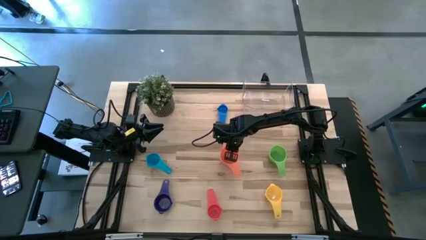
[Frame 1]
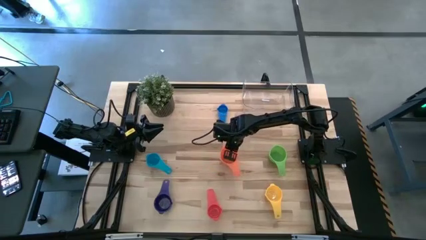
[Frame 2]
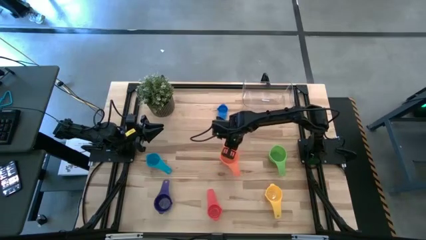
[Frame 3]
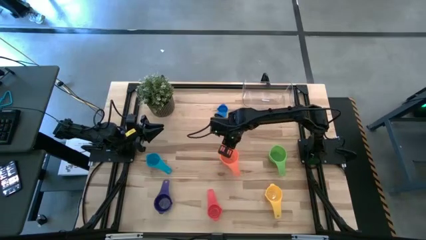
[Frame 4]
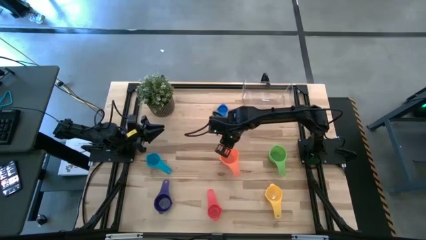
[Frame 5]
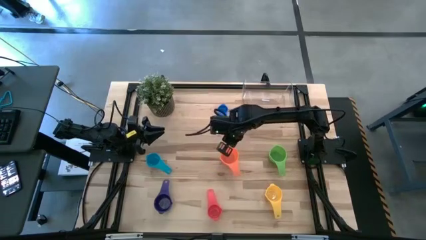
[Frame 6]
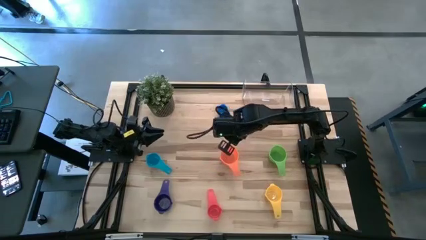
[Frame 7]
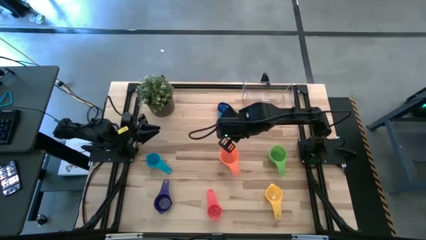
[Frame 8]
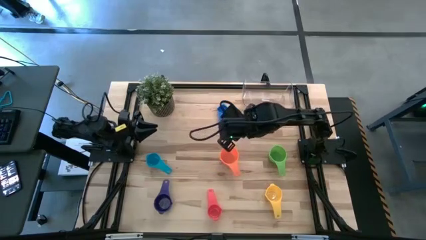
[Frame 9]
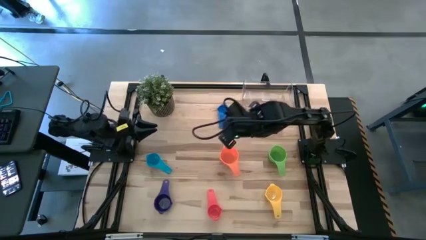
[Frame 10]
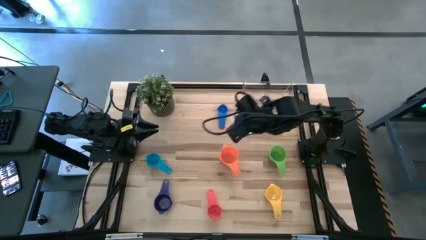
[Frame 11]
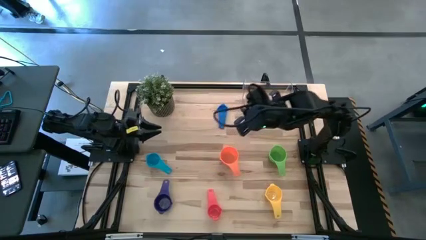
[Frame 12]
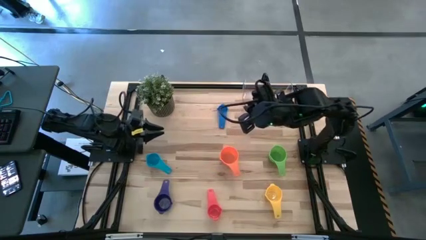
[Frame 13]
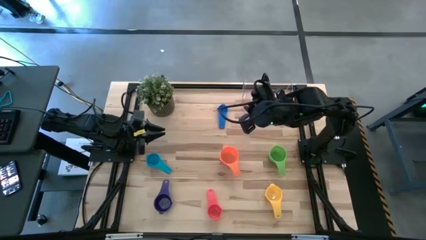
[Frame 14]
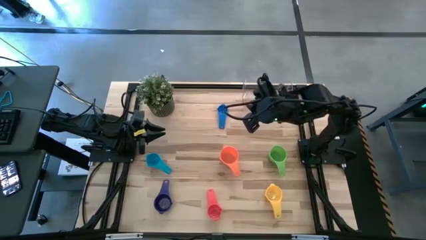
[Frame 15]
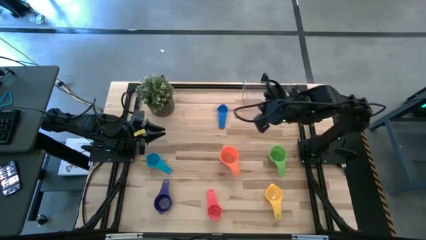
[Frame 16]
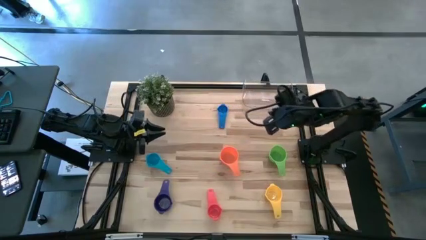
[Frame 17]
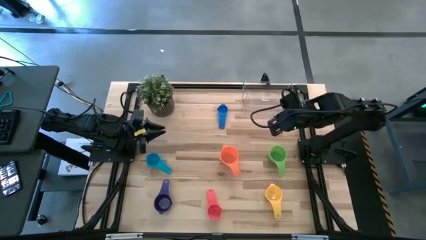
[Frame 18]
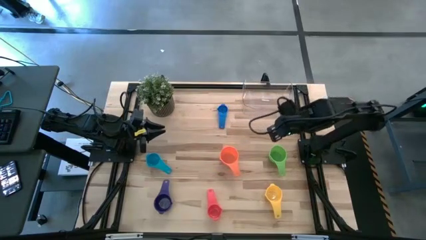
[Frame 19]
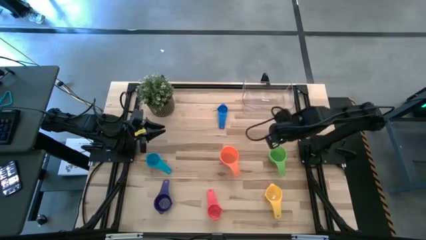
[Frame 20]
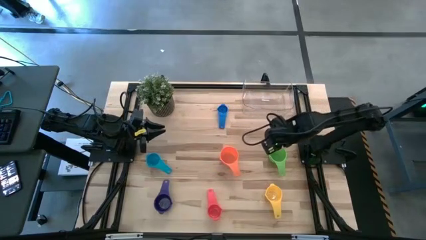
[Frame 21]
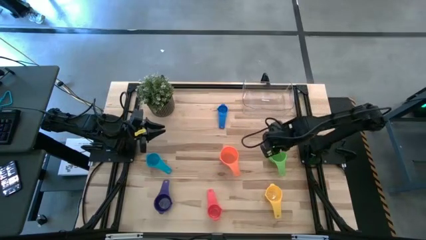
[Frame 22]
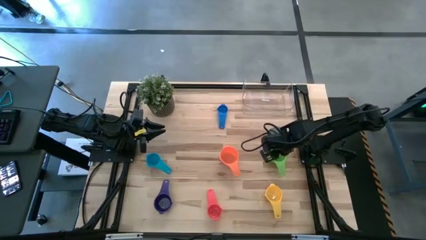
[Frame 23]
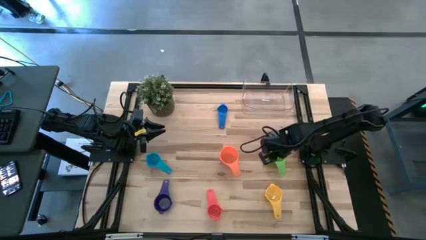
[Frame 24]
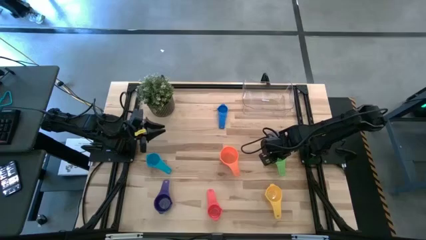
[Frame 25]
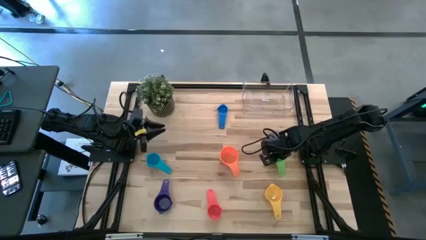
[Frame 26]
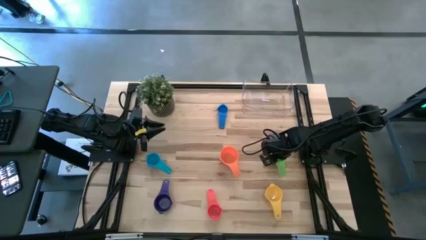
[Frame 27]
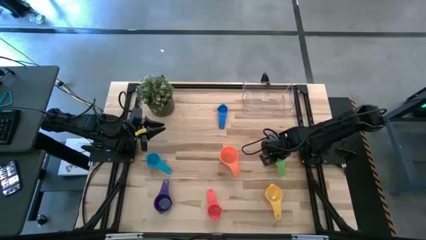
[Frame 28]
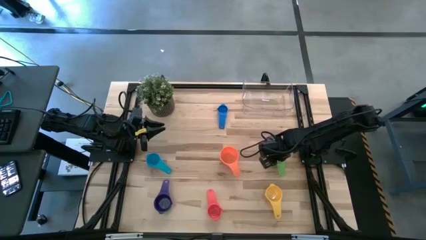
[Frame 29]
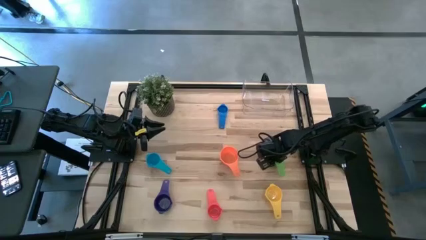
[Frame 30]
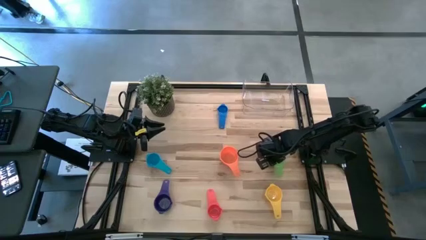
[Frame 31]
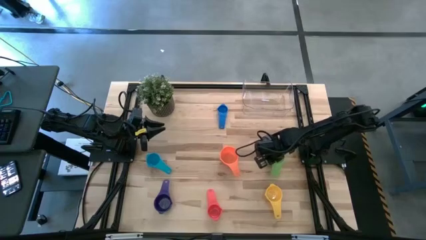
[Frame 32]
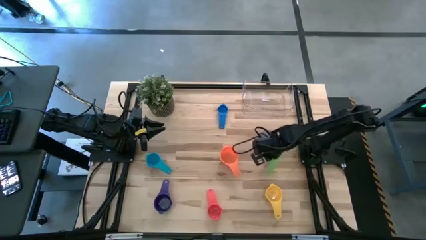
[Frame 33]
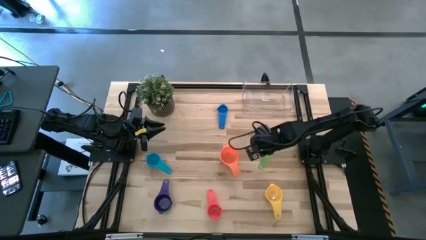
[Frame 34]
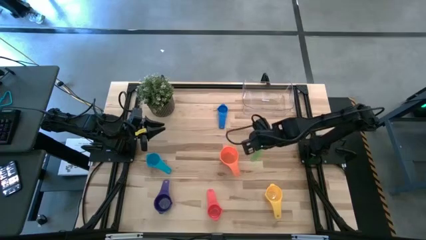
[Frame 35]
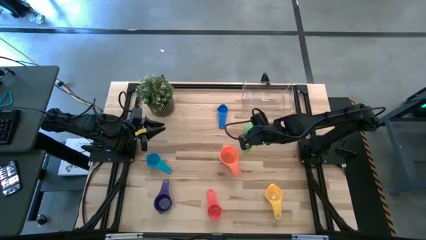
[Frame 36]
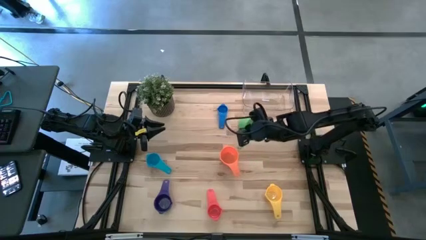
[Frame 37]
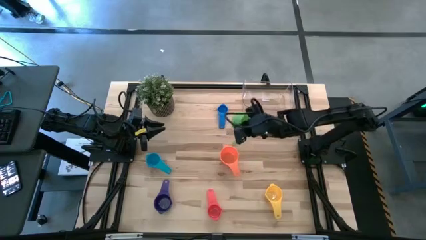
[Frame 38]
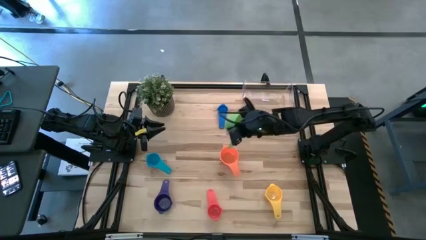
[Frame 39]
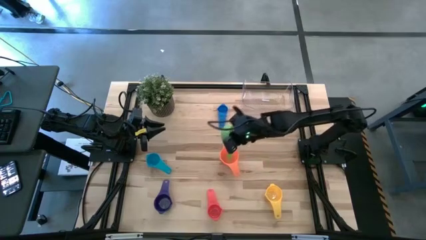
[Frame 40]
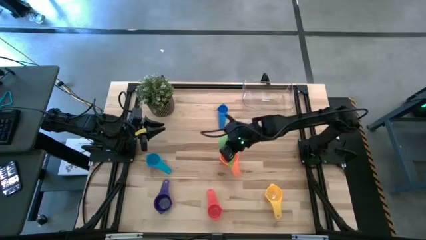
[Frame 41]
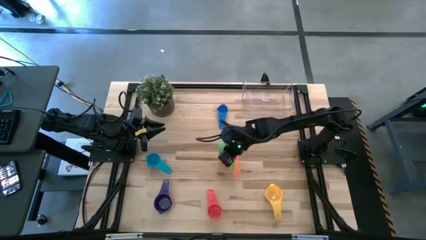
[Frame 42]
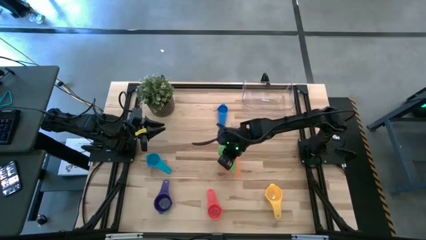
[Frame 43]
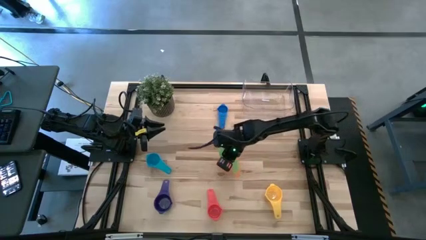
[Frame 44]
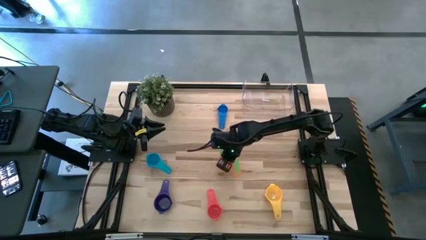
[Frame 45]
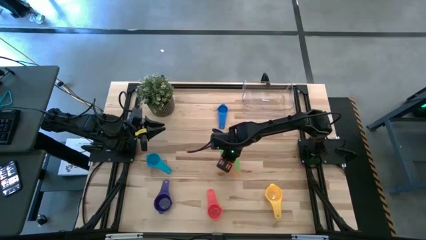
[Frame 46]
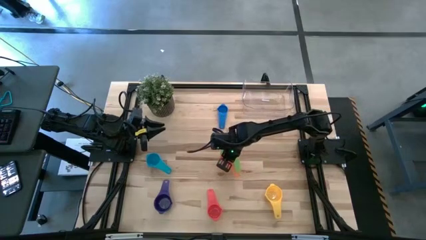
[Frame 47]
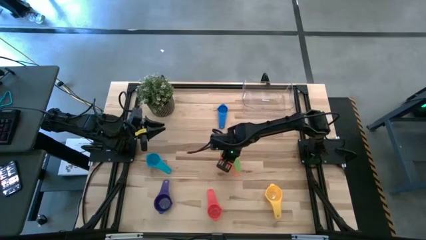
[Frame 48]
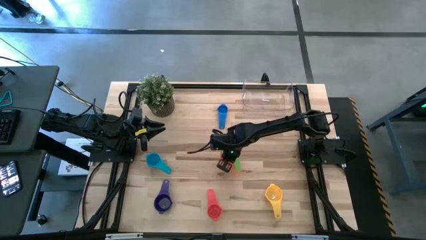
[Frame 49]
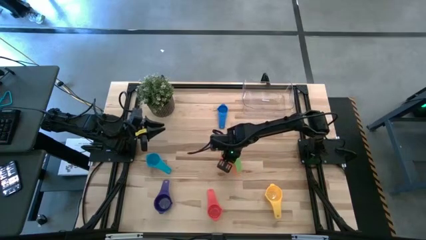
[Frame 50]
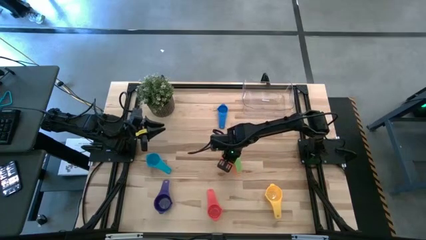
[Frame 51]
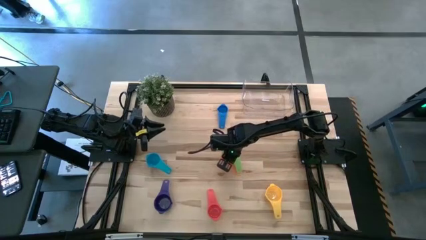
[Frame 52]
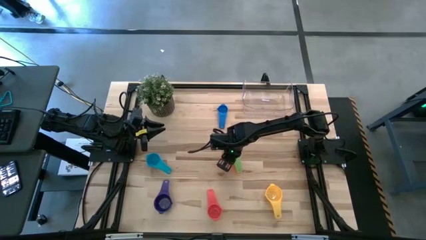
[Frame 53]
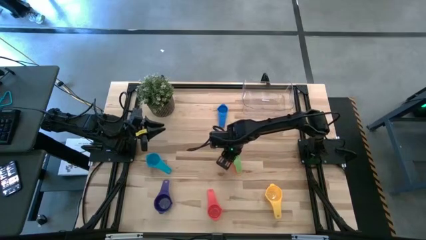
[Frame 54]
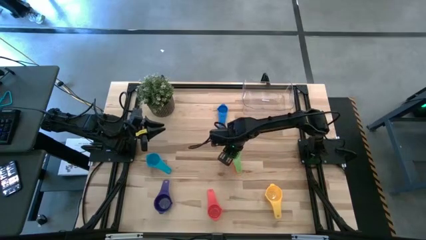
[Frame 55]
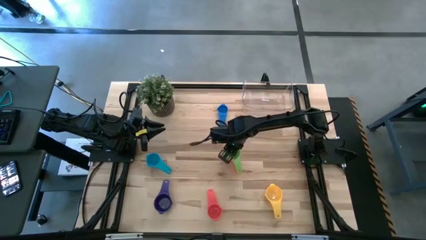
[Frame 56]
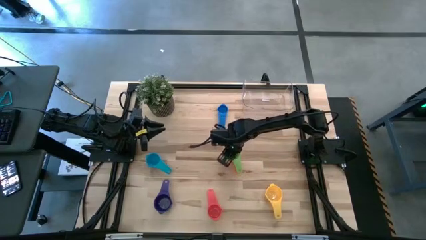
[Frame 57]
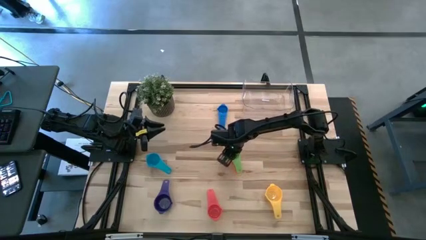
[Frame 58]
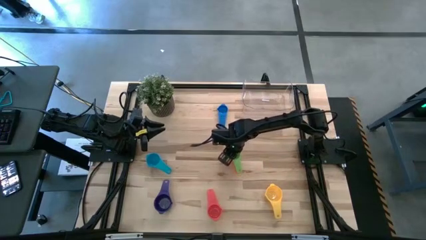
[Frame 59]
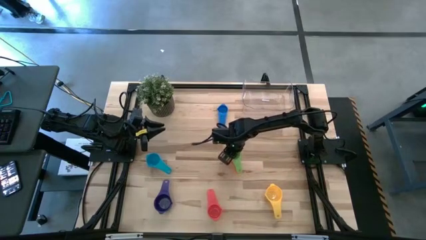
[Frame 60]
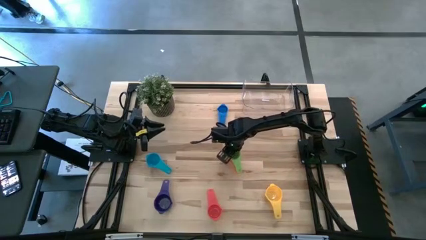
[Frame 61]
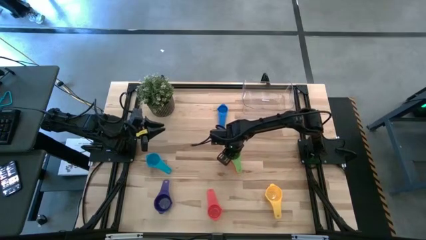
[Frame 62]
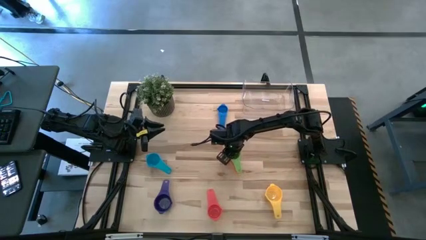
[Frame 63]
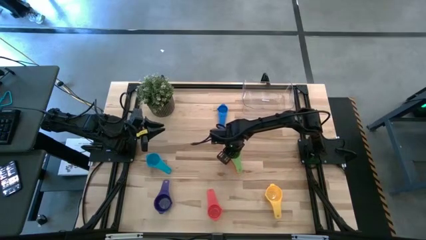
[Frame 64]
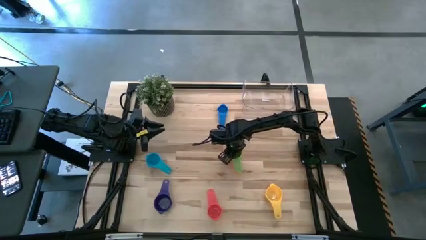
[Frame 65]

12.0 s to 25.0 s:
Task: Nest measuring cups in basket
Stack the green measuring cup on top of the orange measuring cup

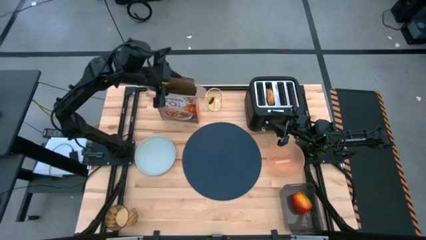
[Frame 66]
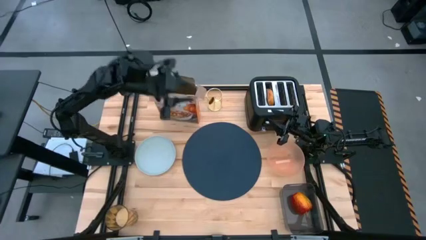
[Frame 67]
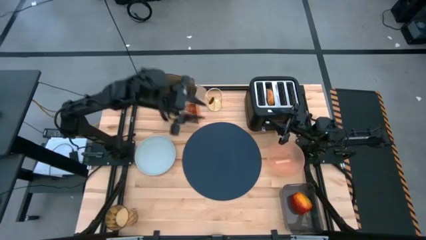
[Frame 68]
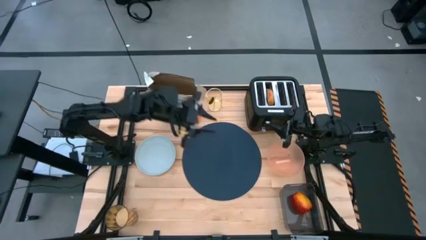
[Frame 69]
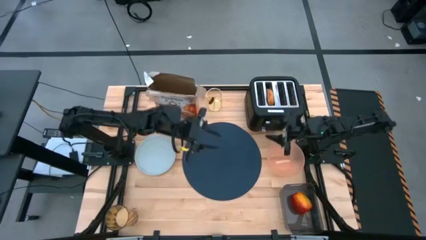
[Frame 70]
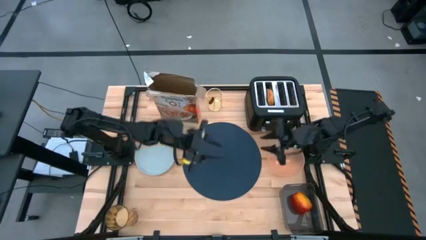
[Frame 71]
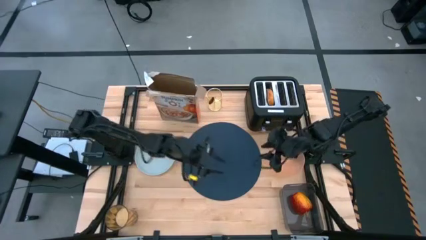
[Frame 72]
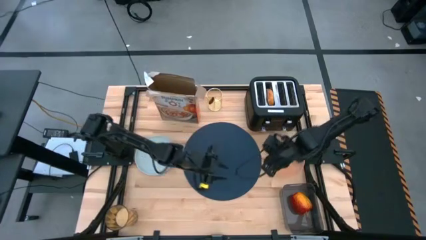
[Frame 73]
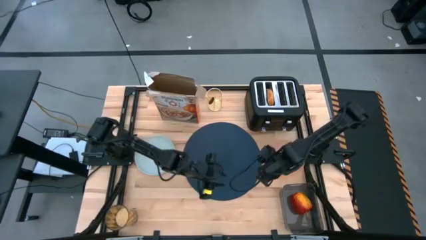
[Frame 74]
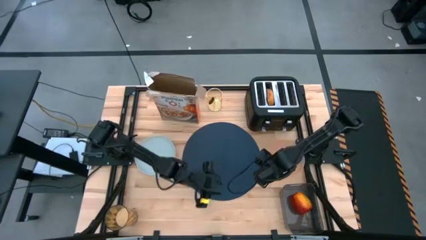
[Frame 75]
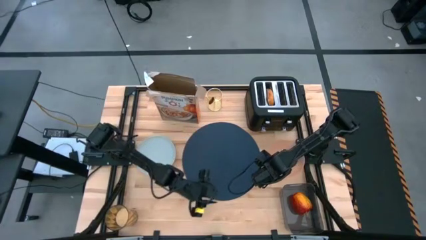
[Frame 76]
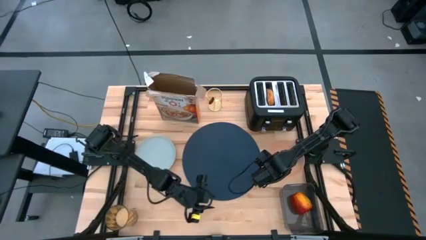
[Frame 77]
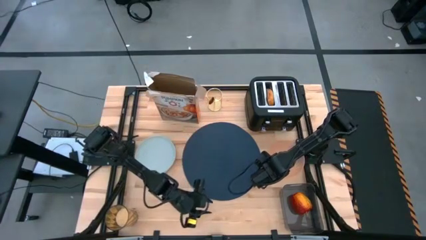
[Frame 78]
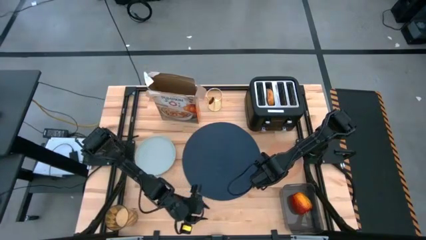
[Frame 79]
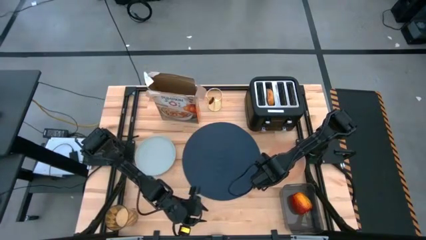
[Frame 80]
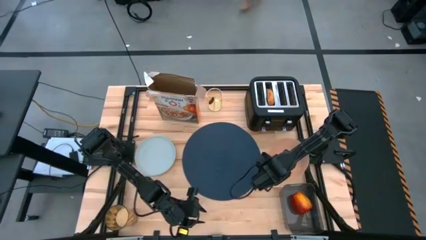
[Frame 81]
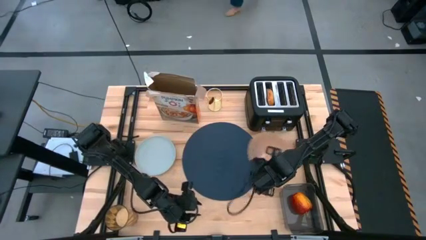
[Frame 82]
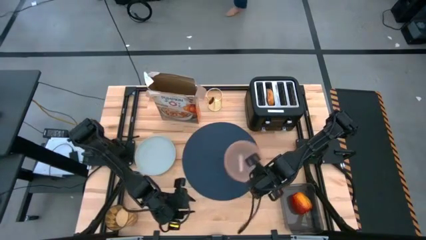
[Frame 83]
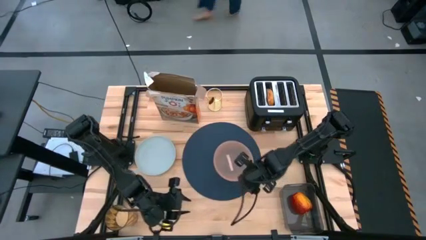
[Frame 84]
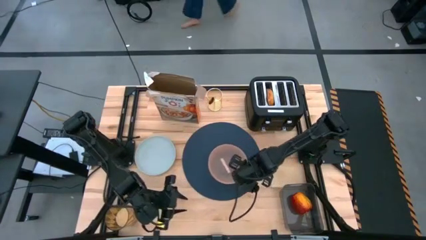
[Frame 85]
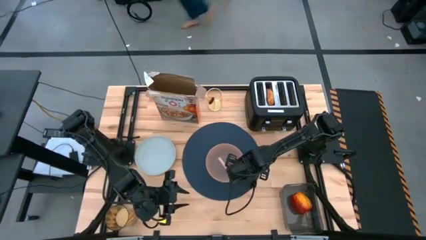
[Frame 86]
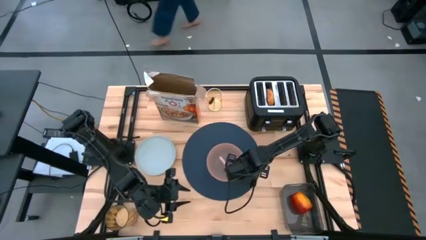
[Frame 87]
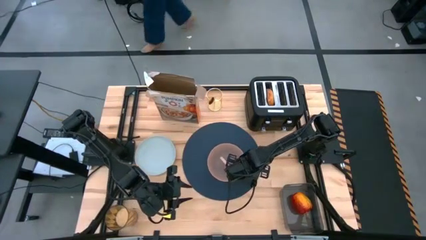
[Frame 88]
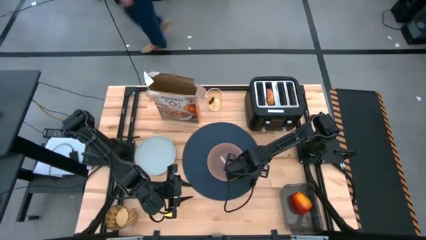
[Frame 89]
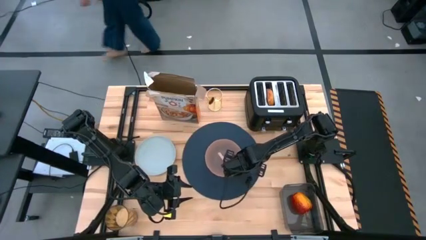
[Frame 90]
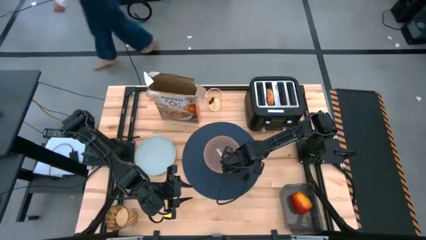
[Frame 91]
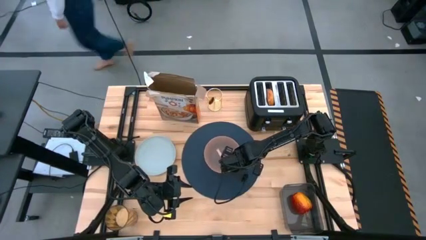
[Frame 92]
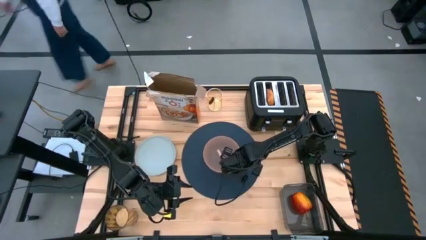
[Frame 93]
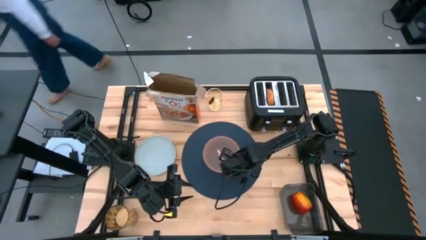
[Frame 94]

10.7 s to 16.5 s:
Task: Arrange a breakfast setting
Put the orange bowl on the blue table mat
